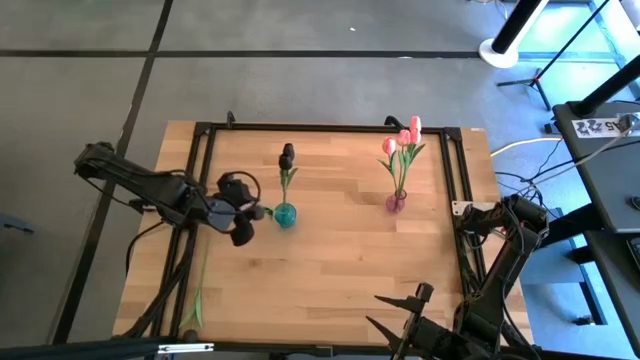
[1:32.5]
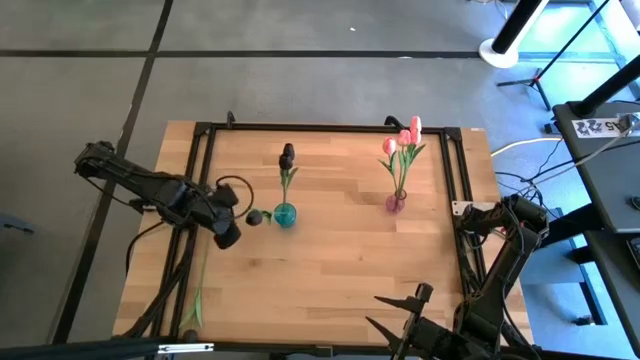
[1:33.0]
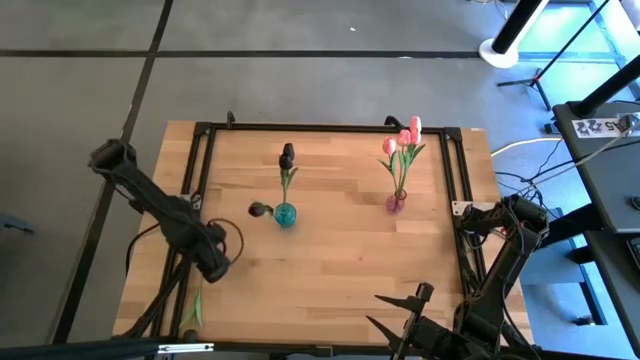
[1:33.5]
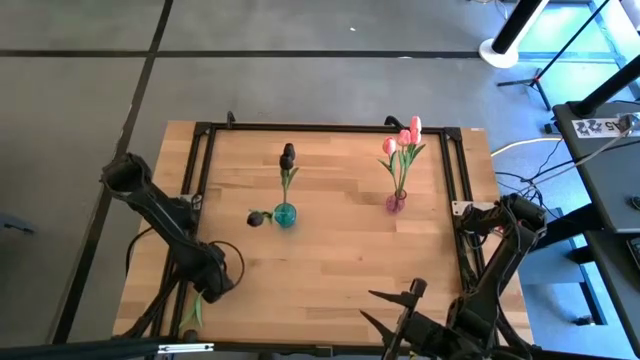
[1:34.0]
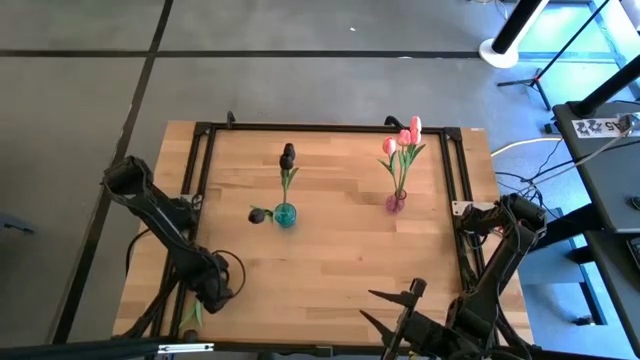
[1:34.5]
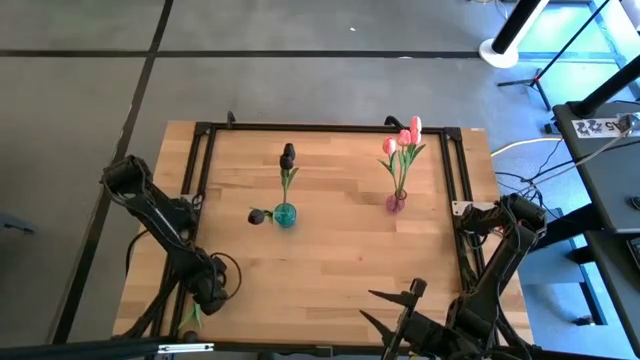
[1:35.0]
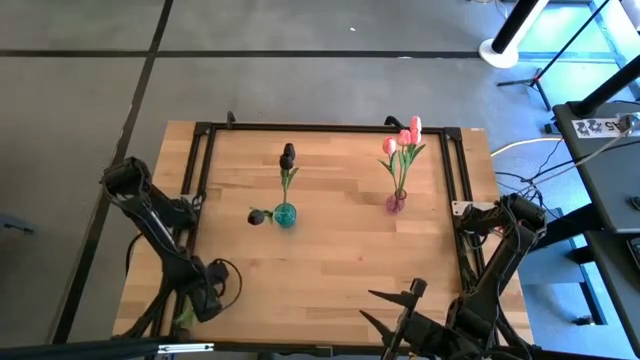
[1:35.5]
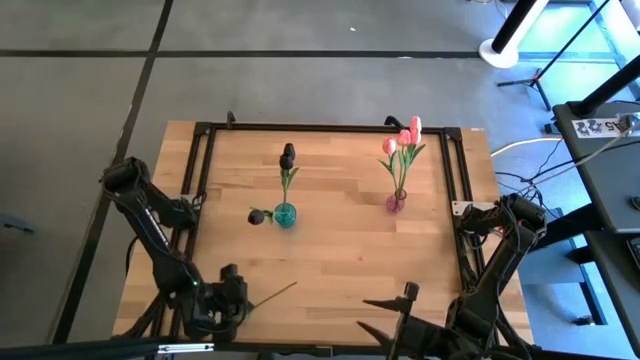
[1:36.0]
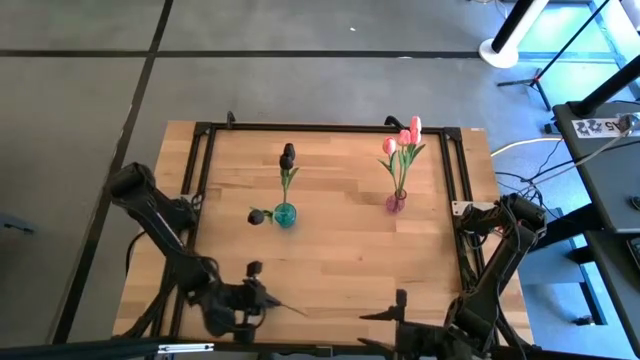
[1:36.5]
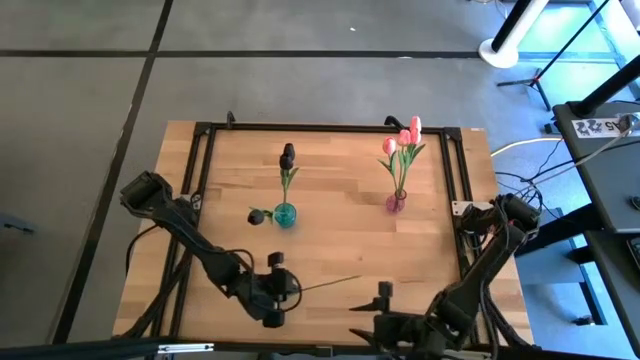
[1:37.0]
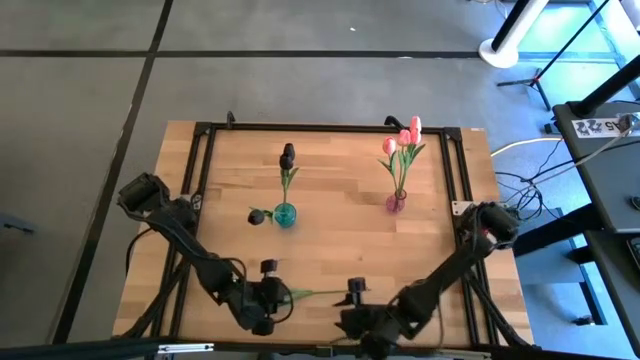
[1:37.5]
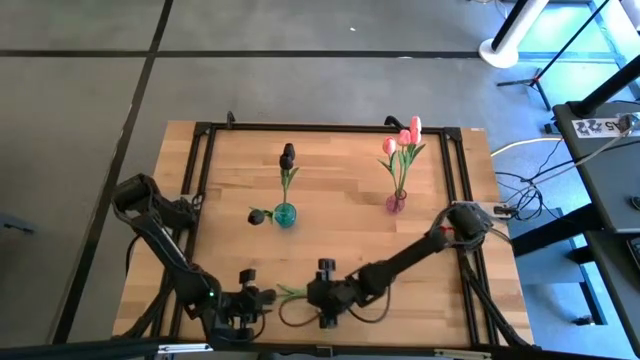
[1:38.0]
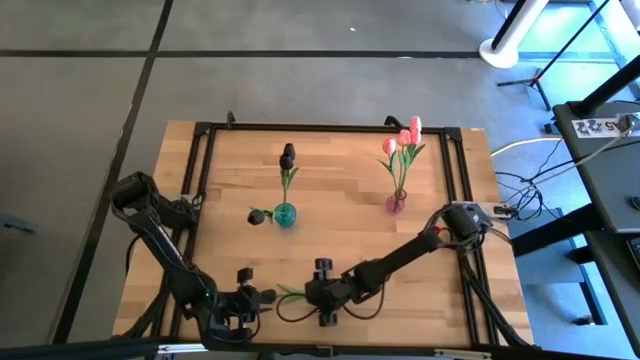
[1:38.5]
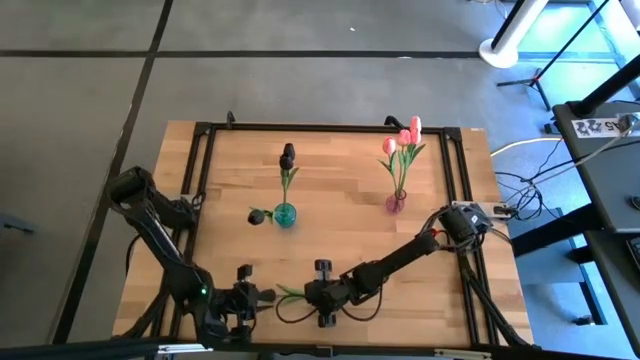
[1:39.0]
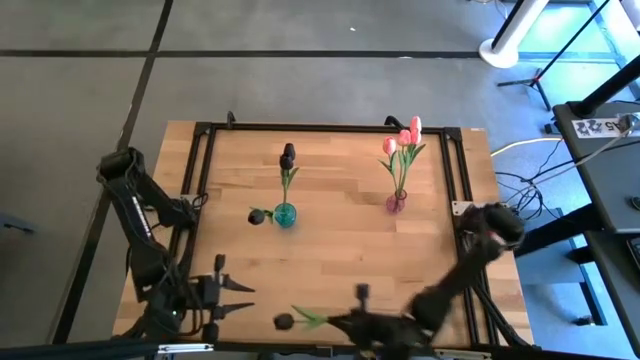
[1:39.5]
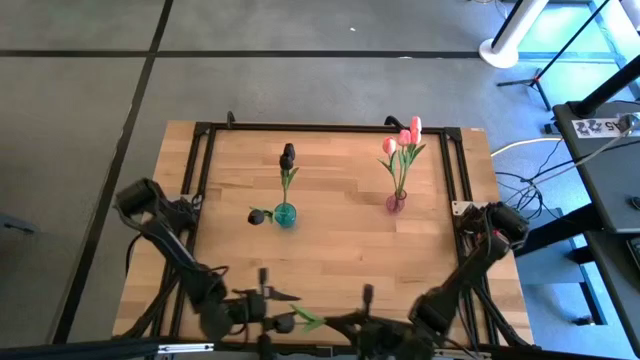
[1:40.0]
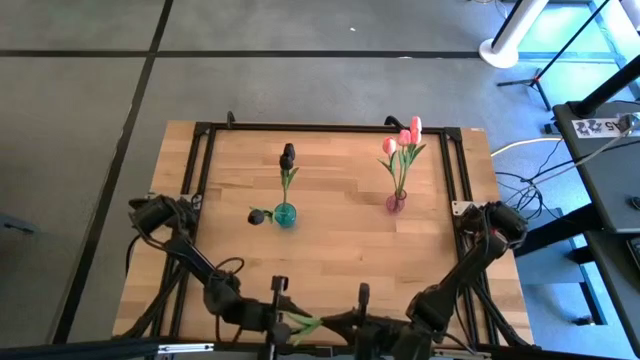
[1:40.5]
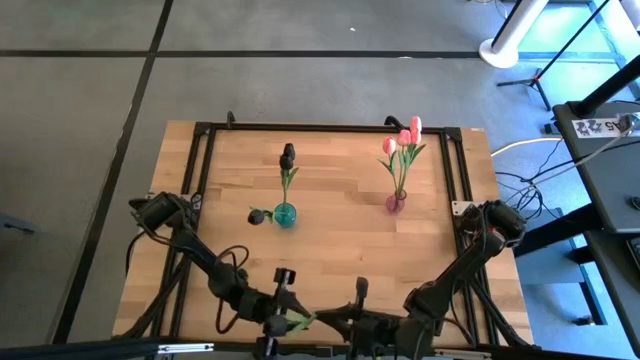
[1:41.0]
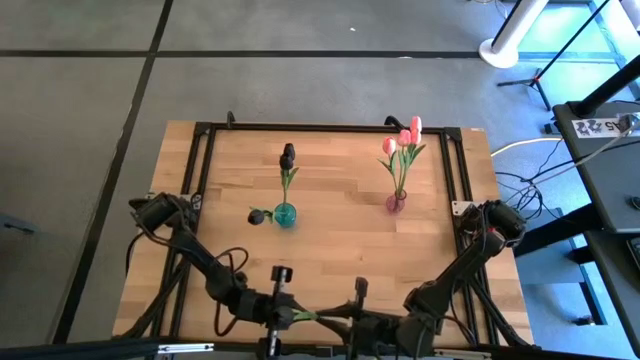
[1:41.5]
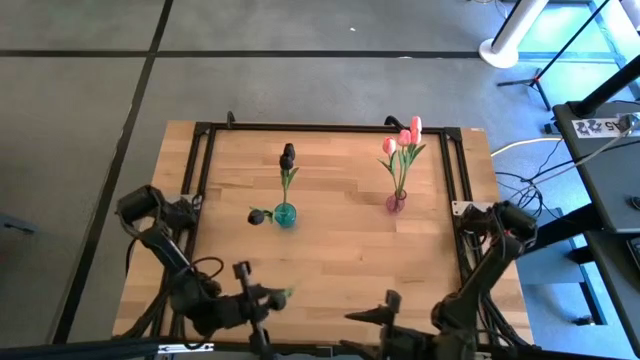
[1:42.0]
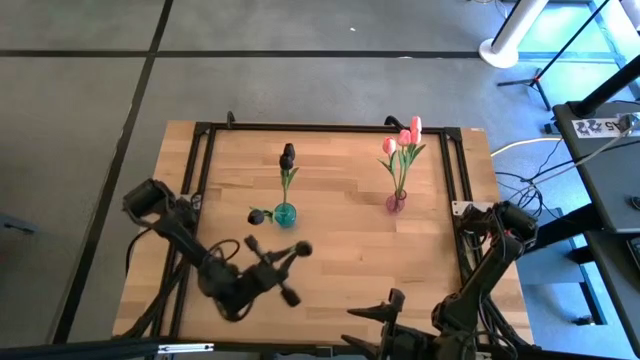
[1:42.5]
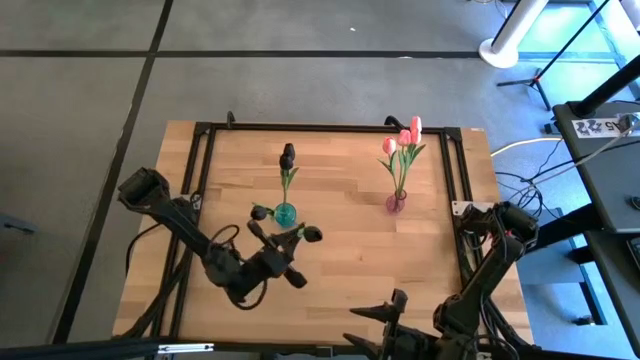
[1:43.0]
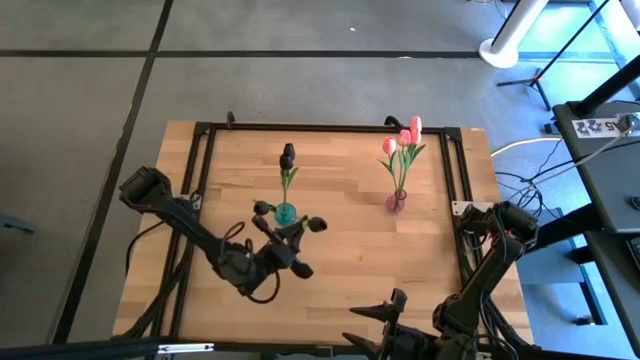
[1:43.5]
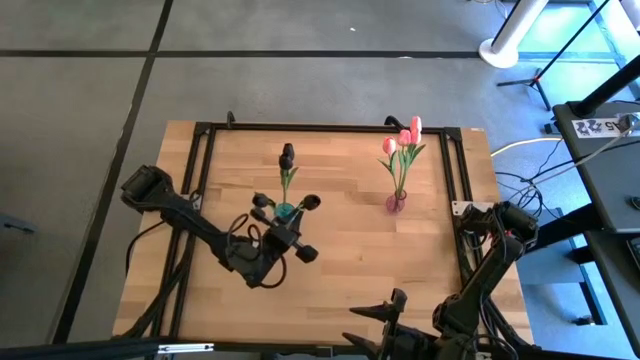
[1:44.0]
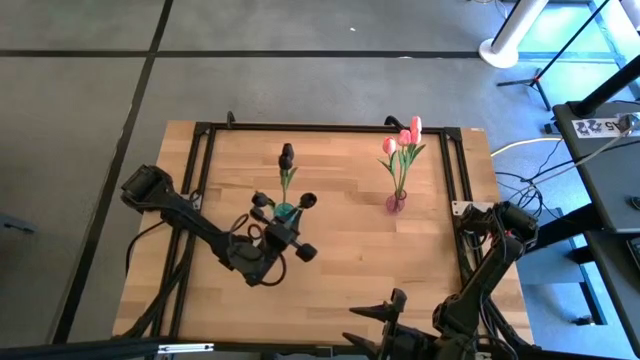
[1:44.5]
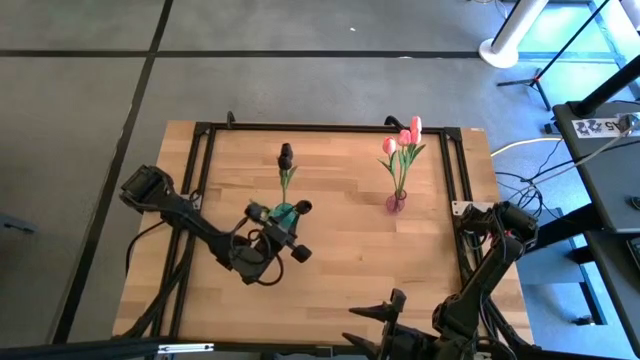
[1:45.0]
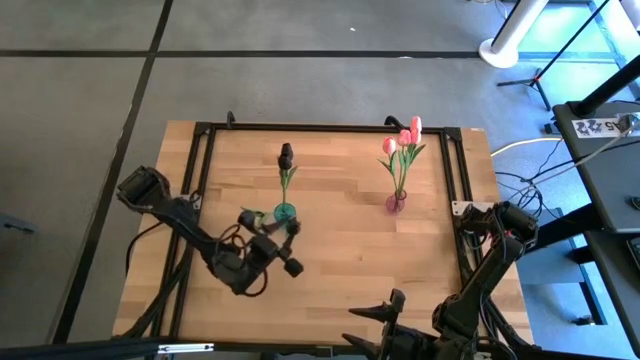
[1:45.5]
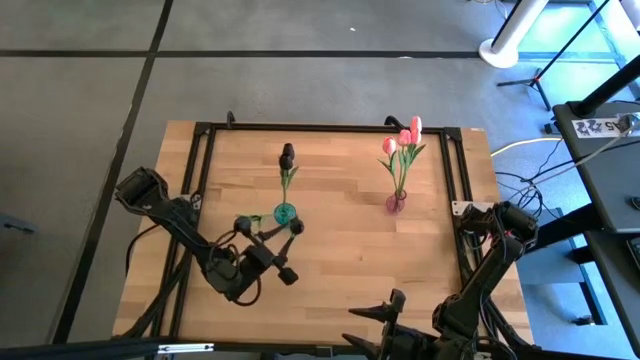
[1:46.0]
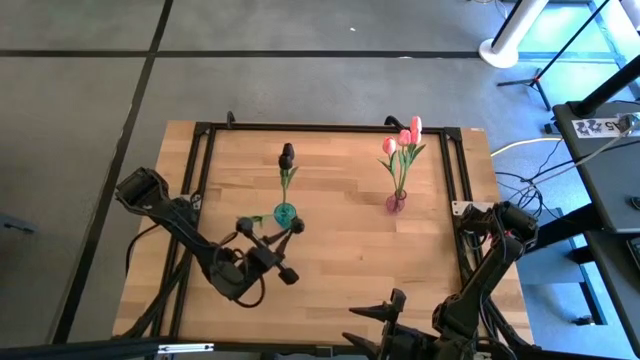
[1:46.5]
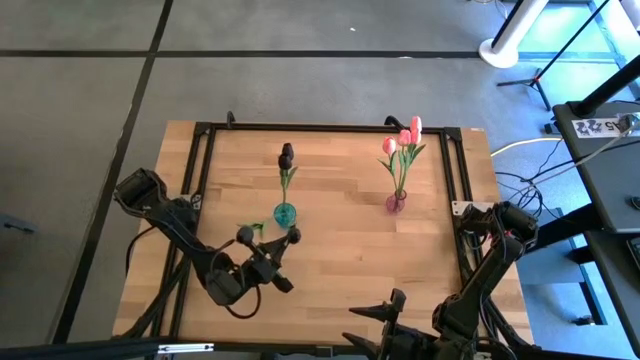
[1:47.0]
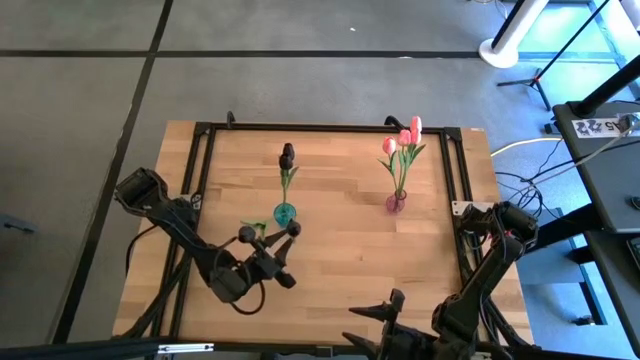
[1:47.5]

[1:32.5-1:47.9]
Task: Sort flowers into vase by color
Put the black tulip into the blue vase

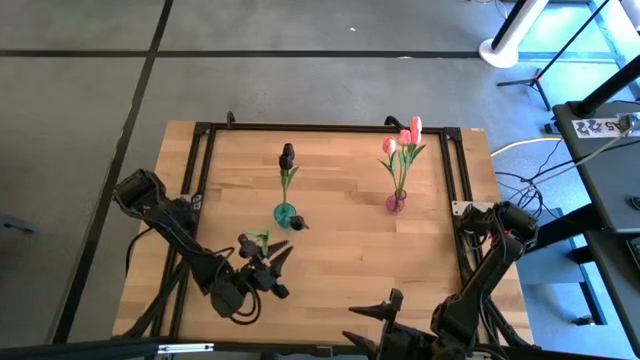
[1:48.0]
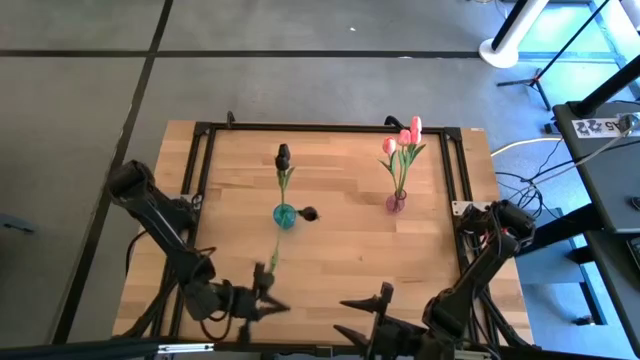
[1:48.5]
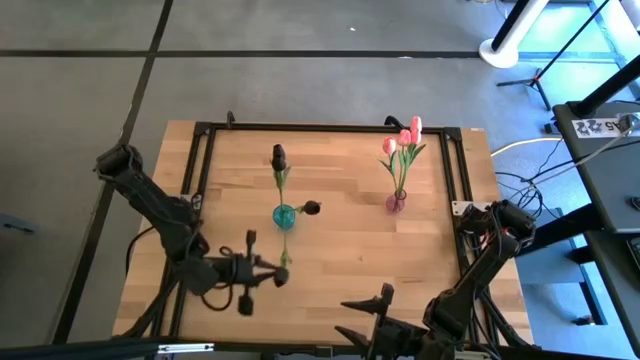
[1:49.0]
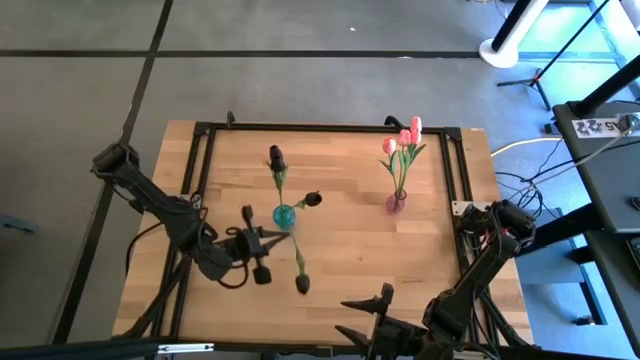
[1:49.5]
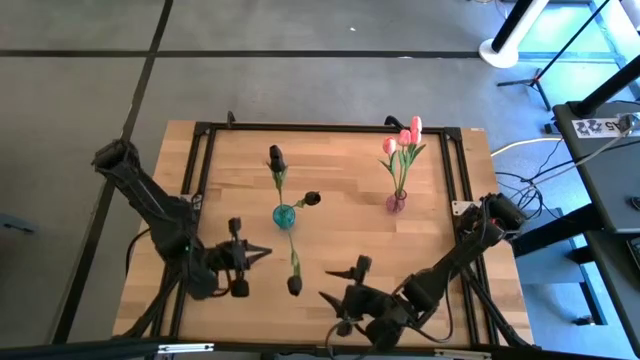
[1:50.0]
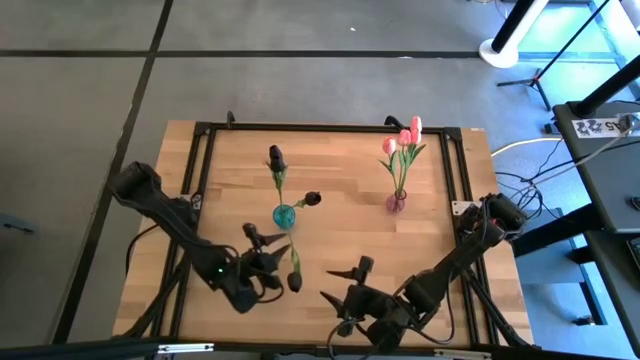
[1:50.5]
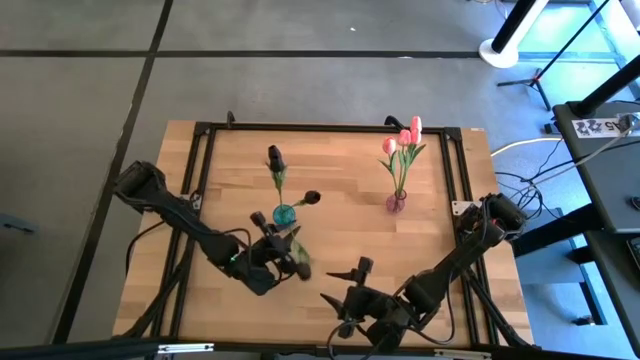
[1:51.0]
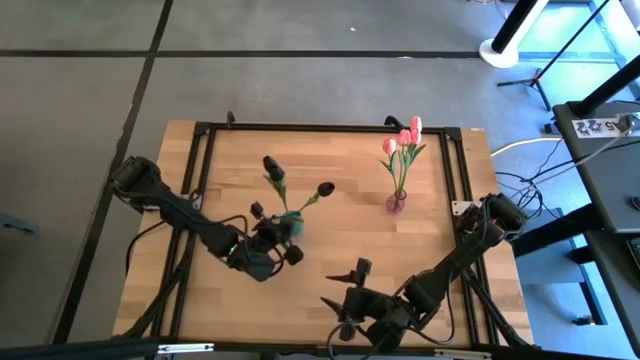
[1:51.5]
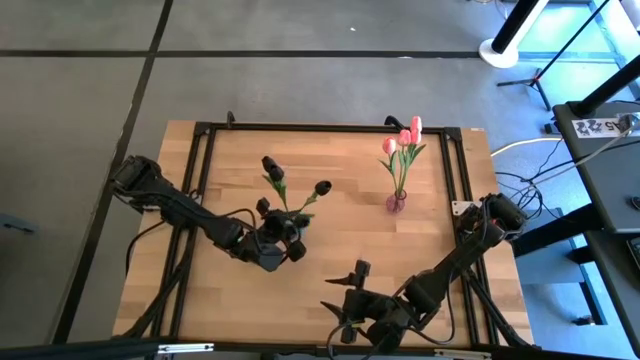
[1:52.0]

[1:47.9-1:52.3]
Adjust the black tulip in the blue vase
